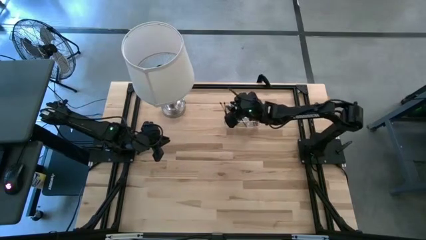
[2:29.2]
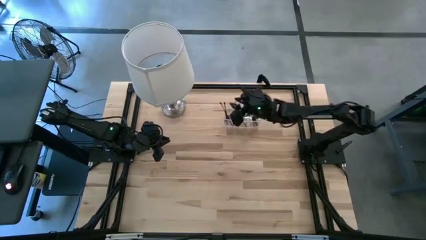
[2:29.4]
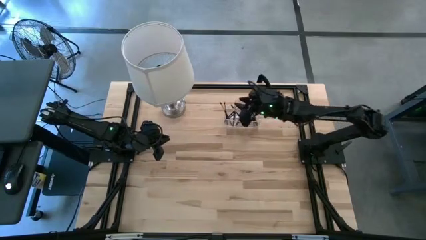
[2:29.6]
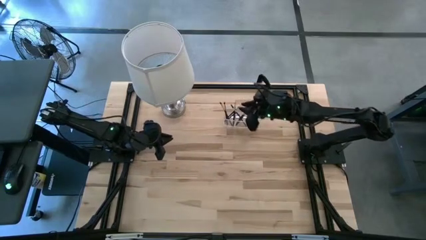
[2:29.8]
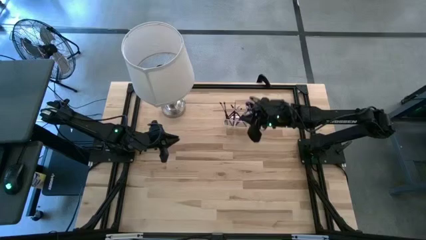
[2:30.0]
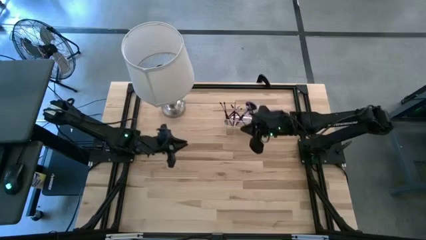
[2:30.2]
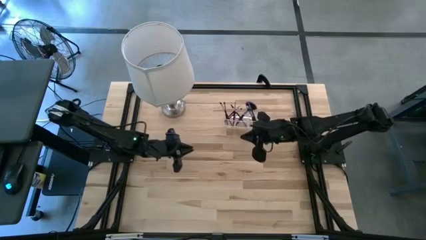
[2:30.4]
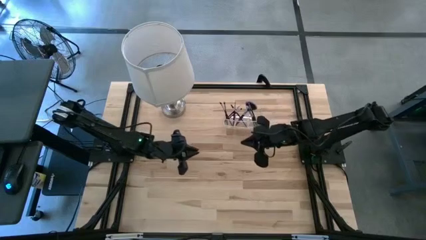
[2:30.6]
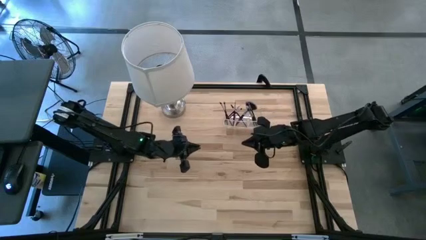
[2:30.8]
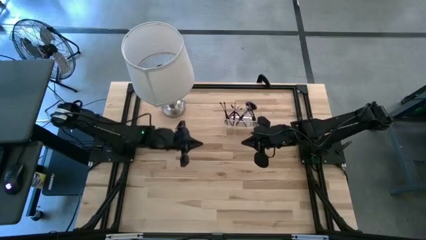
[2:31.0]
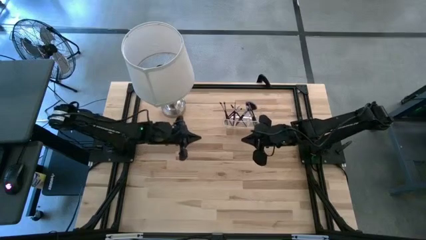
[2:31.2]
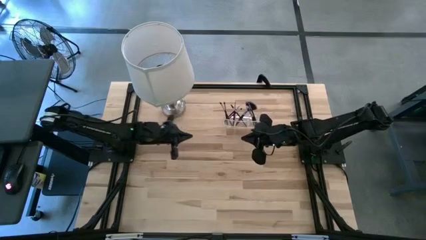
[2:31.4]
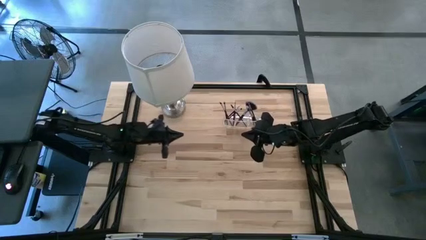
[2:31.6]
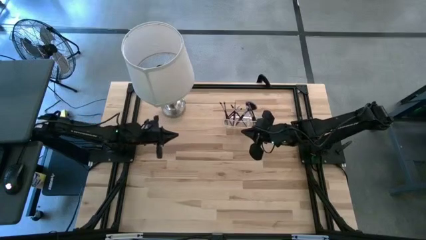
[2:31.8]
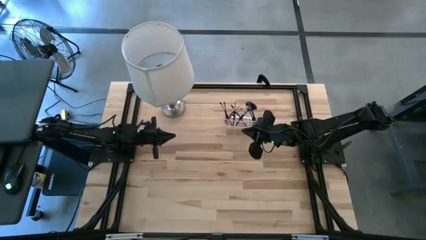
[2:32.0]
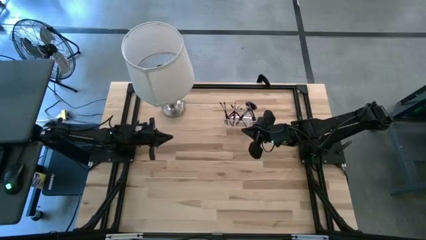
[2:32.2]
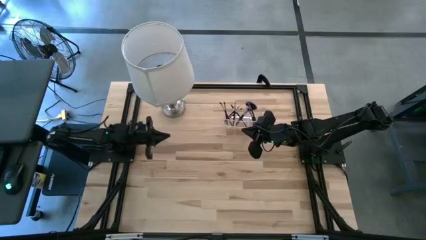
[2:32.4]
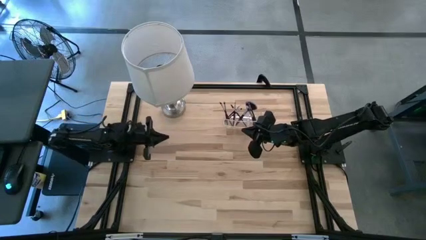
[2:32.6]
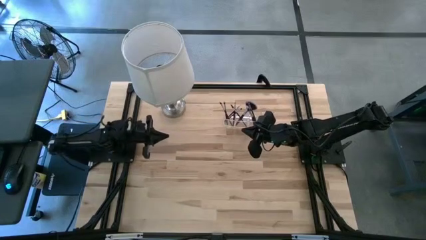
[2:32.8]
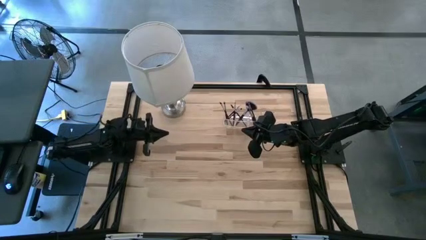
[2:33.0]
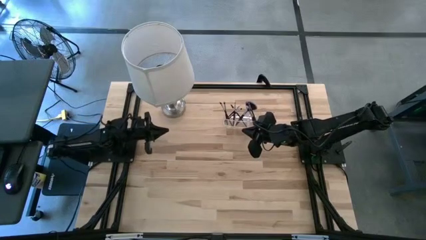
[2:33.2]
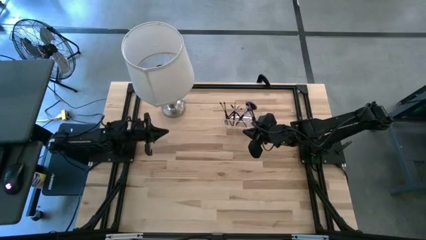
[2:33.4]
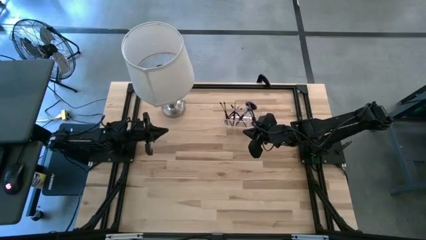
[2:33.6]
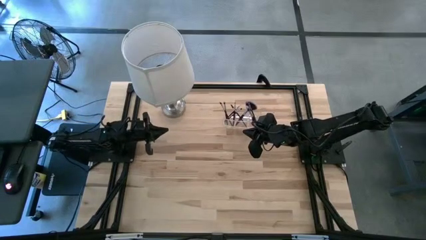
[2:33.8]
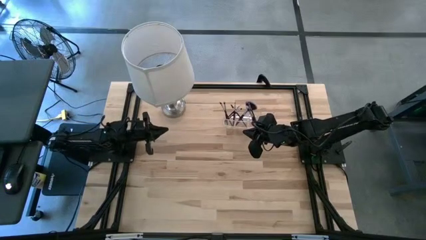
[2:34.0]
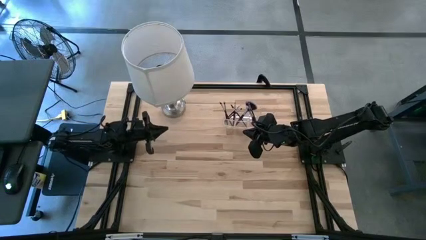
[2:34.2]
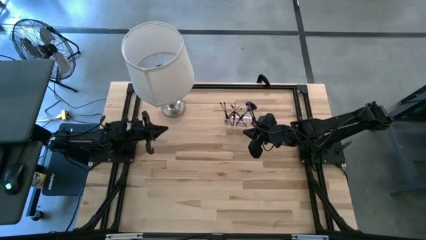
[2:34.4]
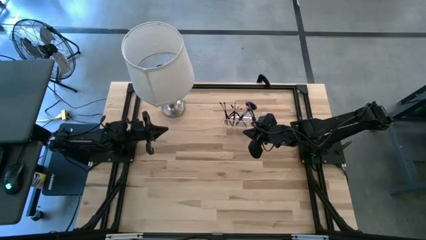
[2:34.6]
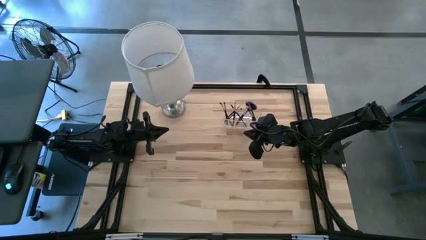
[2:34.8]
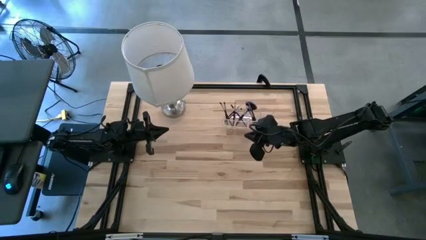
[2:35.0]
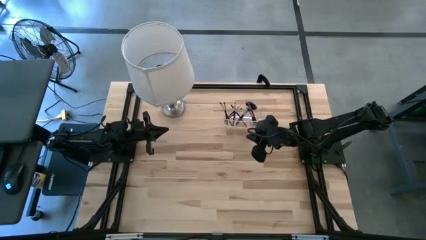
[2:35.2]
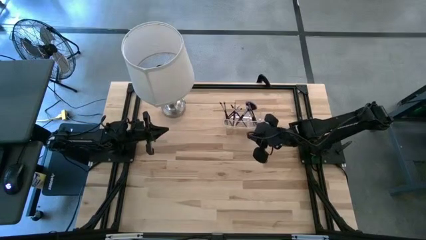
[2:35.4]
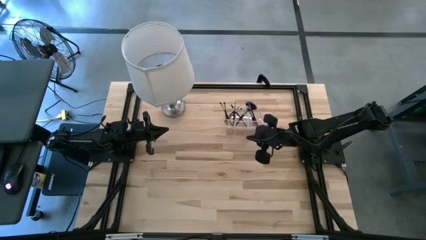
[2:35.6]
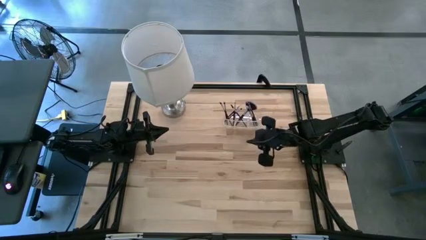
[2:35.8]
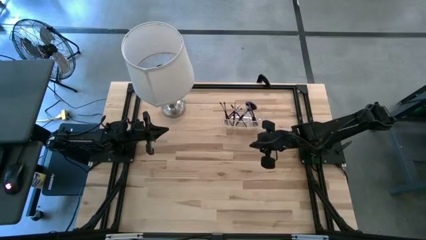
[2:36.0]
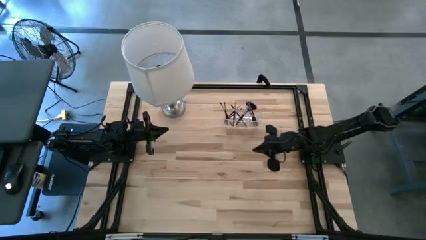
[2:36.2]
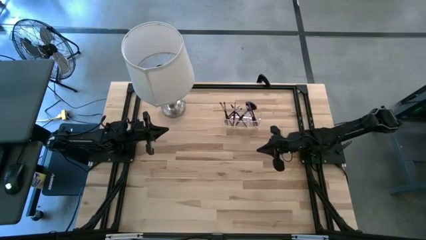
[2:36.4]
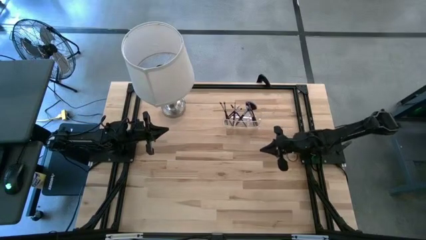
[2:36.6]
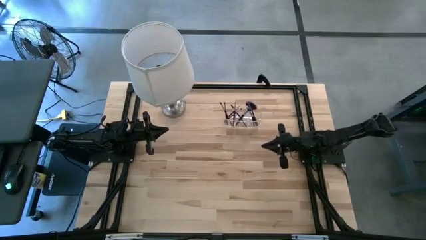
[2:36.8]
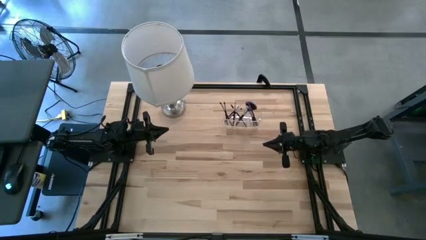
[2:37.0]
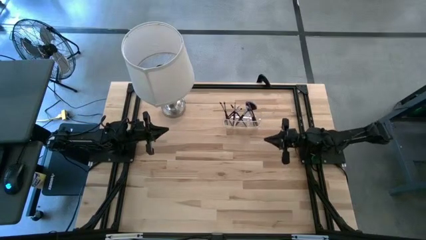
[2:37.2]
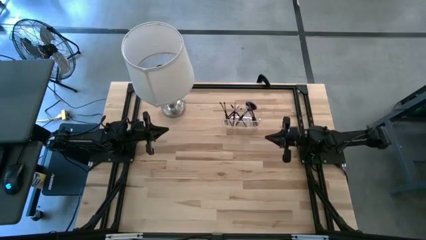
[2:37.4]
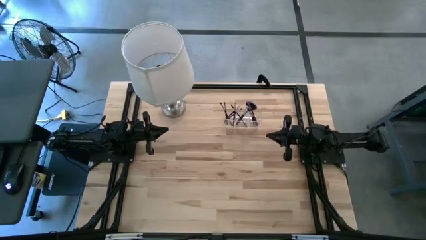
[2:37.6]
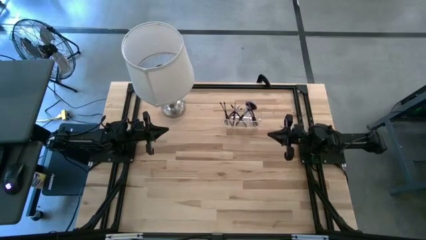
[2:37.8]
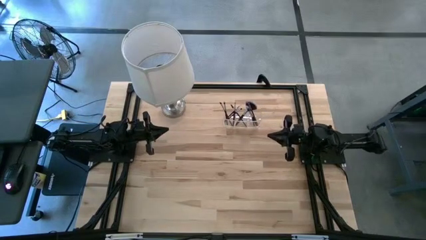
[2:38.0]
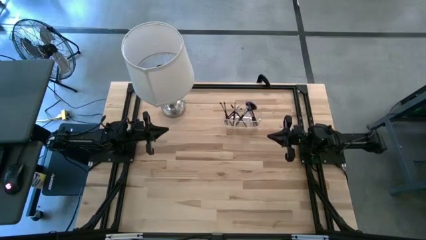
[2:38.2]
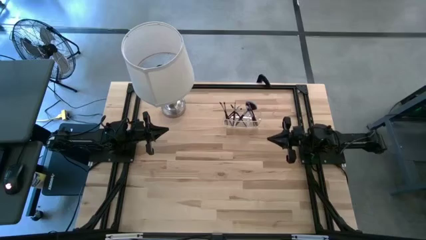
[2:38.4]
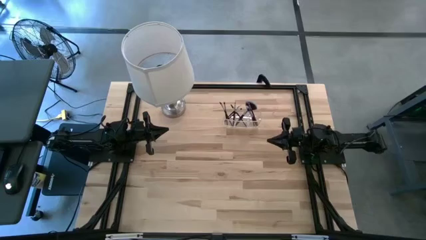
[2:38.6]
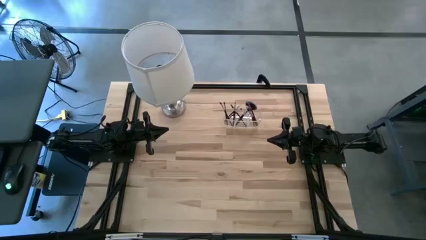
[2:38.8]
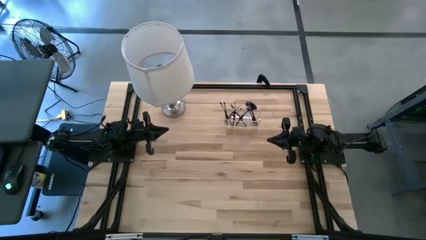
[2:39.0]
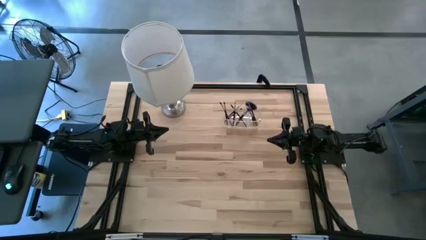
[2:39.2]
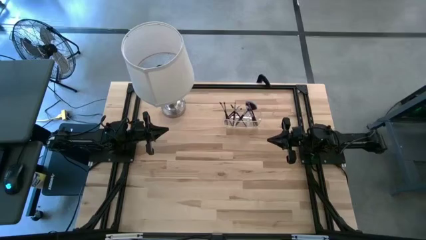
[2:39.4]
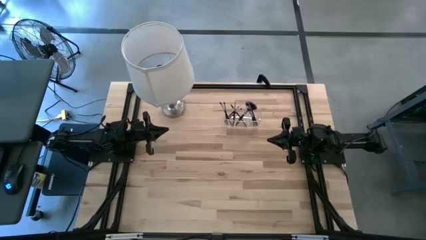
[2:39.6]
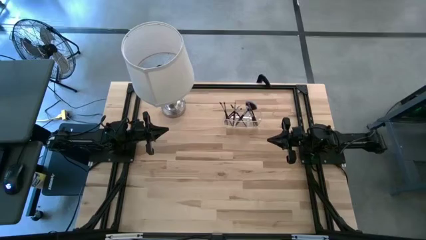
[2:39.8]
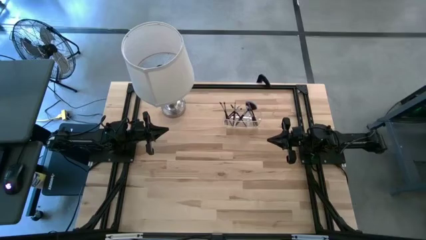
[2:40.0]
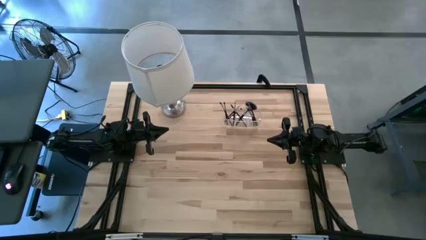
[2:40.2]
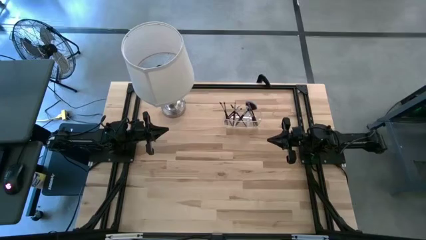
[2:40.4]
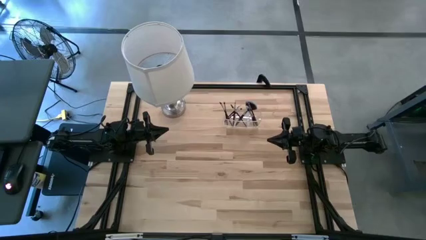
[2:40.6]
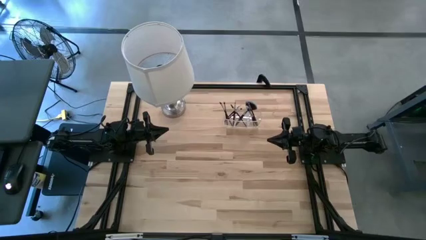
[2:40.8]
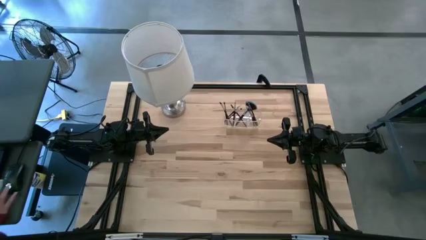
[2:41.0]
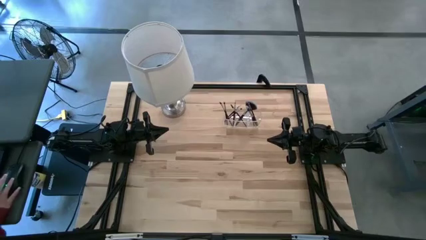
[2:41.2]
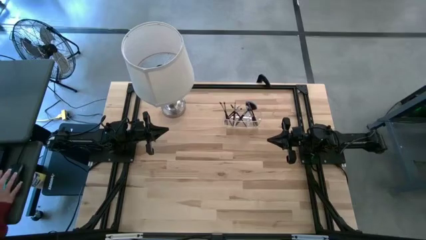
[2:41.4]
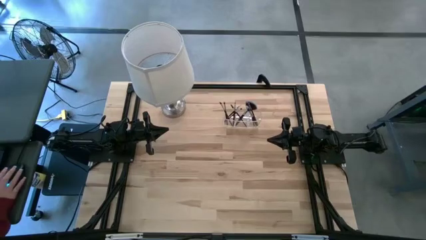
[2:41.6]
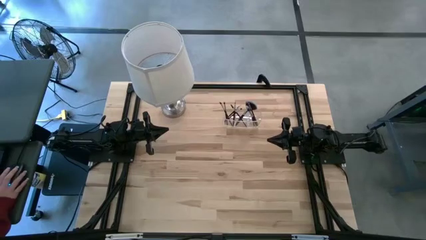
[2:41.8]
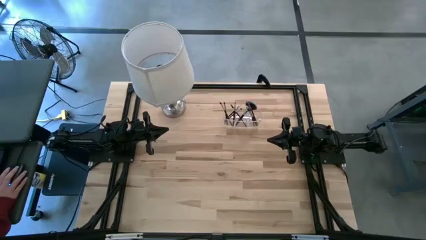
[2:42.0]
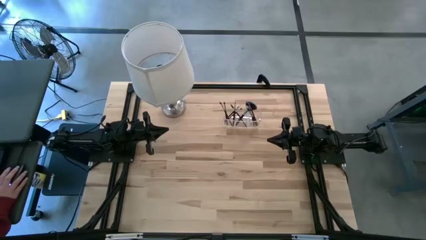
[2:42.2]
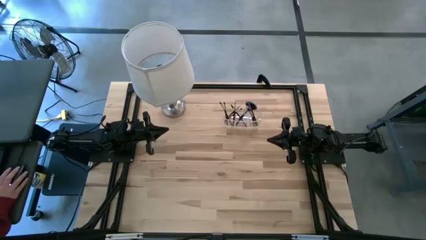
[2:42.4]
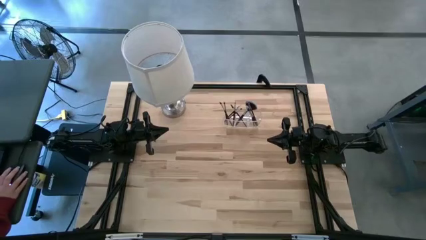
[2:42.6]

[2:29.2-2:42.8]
Task: Pick & Place Makeup Supplies
Return to Home Position
